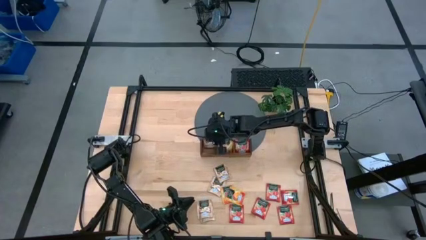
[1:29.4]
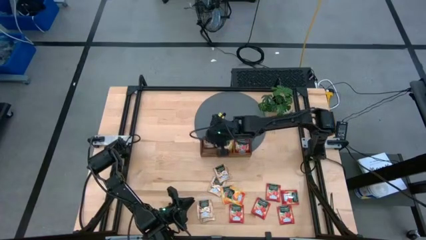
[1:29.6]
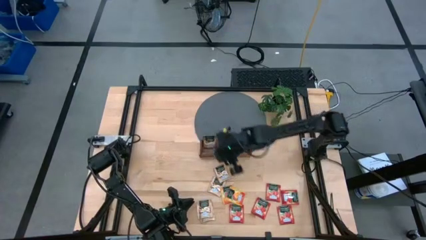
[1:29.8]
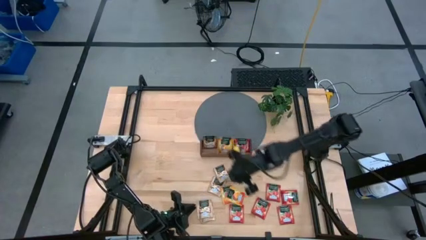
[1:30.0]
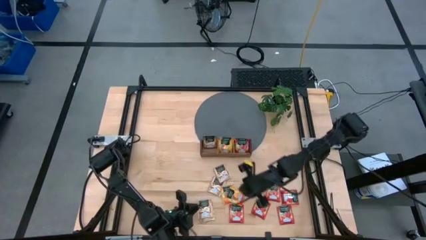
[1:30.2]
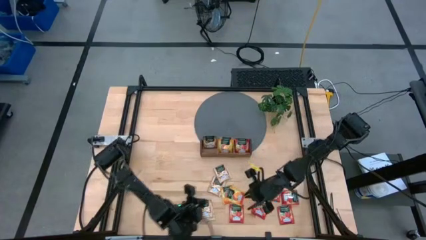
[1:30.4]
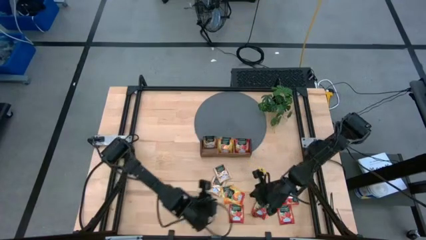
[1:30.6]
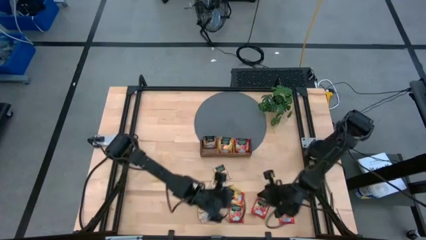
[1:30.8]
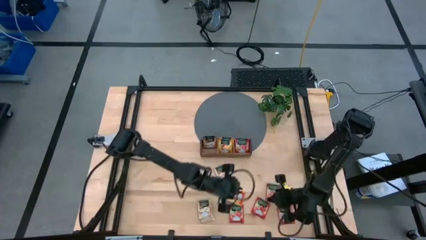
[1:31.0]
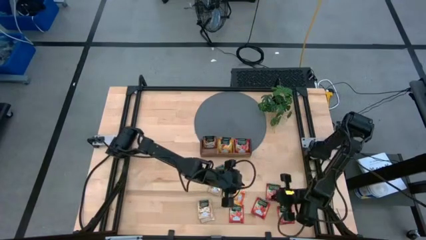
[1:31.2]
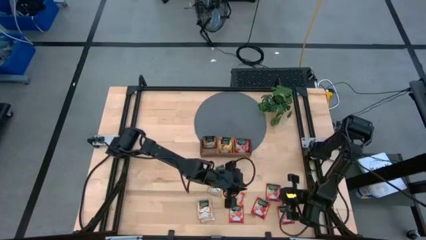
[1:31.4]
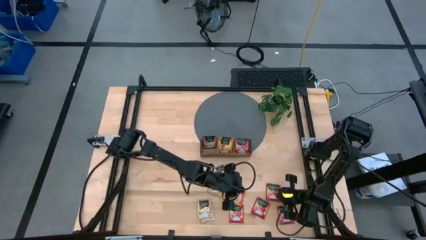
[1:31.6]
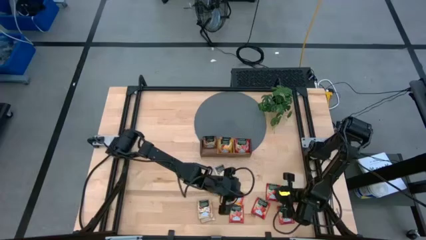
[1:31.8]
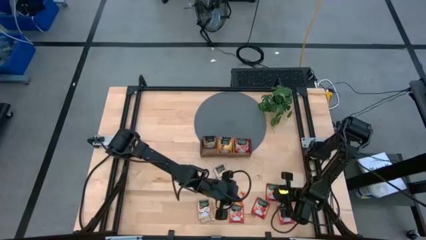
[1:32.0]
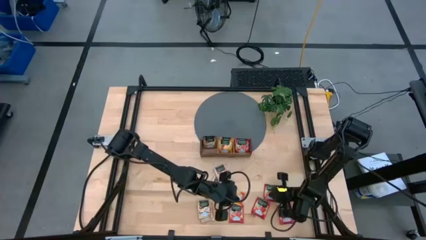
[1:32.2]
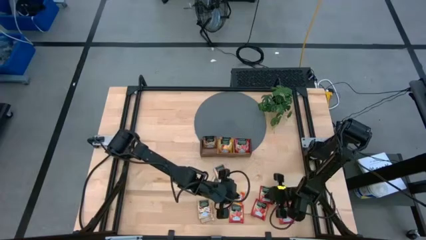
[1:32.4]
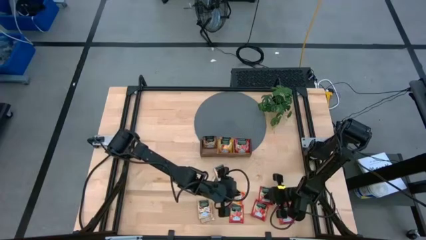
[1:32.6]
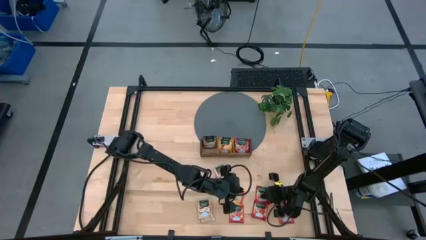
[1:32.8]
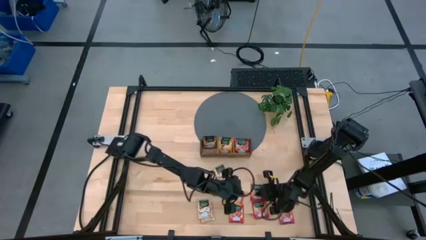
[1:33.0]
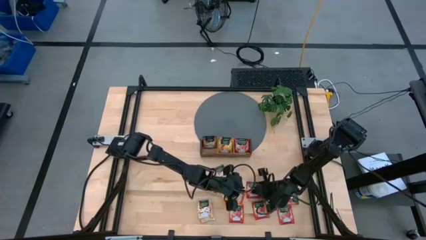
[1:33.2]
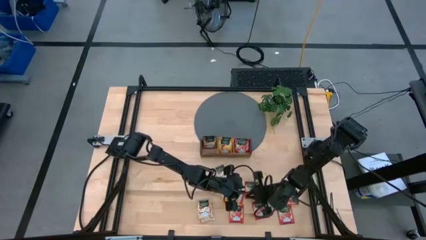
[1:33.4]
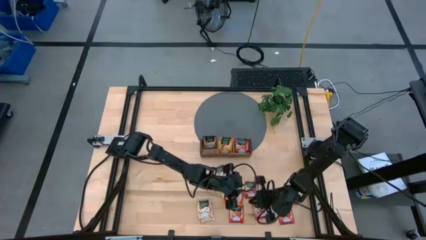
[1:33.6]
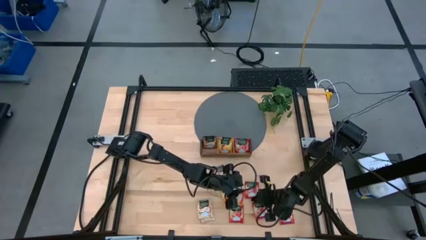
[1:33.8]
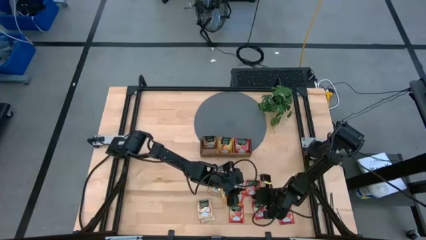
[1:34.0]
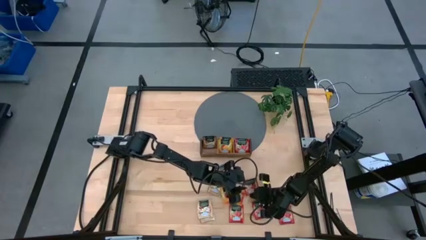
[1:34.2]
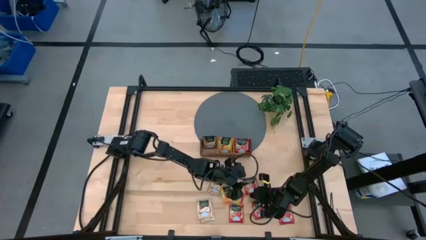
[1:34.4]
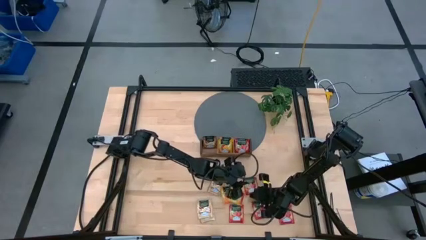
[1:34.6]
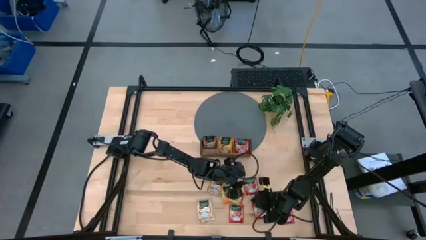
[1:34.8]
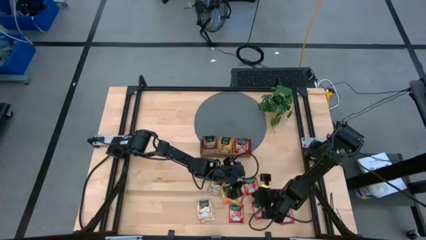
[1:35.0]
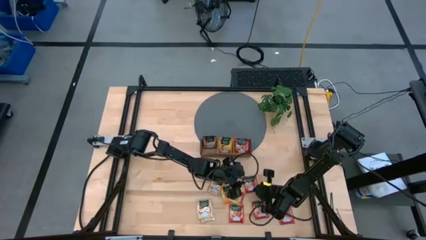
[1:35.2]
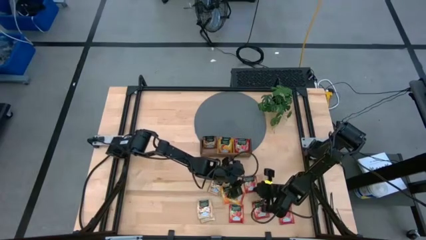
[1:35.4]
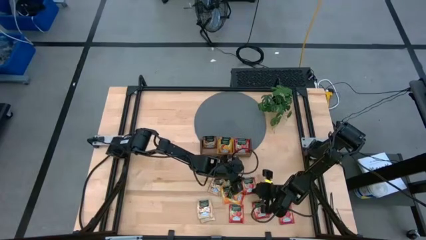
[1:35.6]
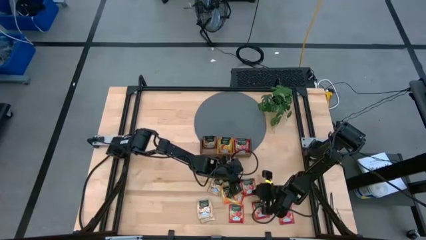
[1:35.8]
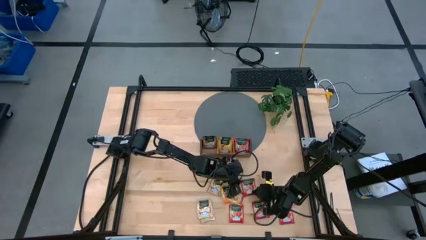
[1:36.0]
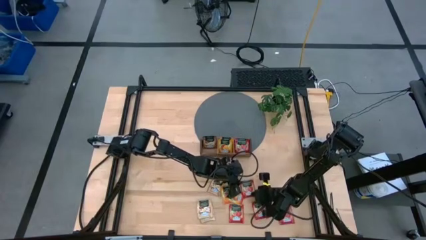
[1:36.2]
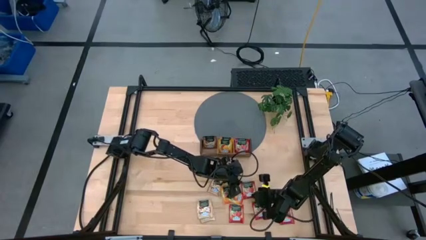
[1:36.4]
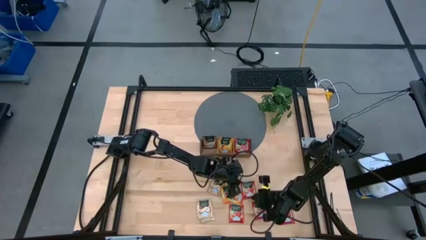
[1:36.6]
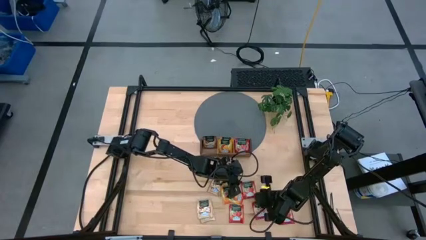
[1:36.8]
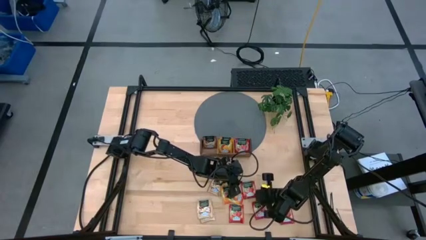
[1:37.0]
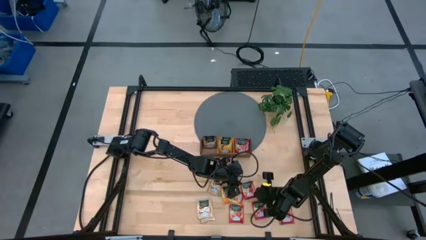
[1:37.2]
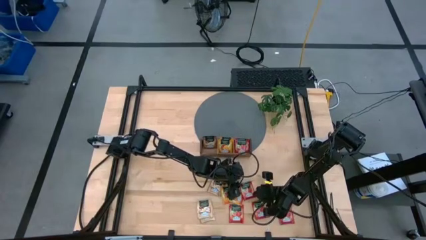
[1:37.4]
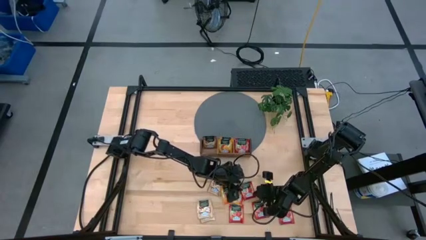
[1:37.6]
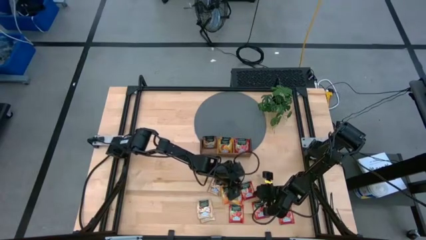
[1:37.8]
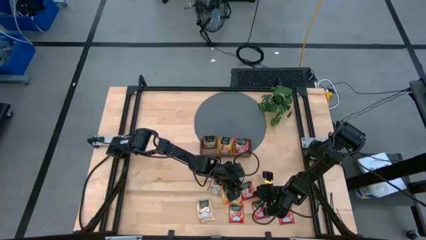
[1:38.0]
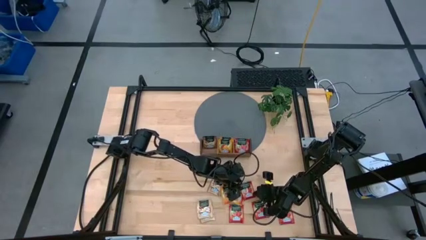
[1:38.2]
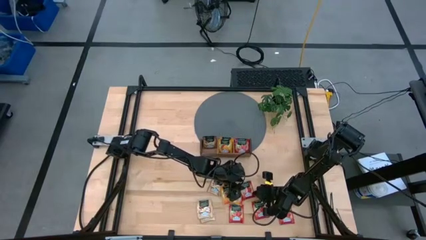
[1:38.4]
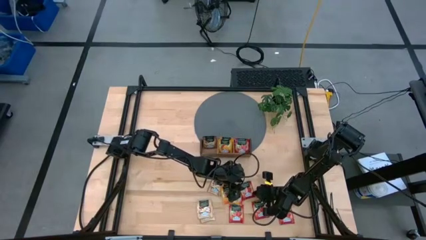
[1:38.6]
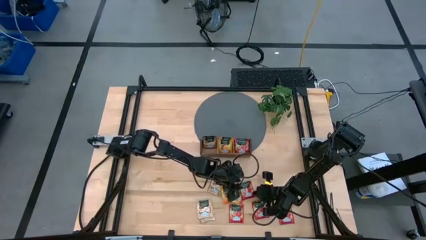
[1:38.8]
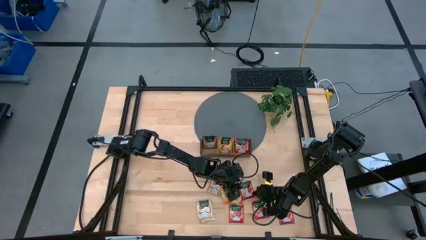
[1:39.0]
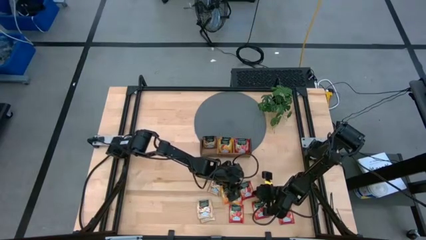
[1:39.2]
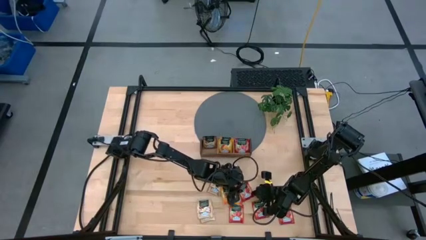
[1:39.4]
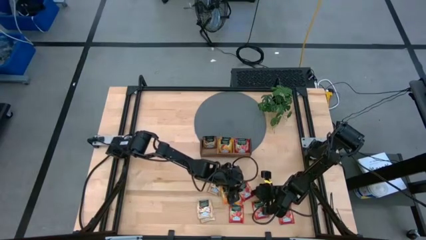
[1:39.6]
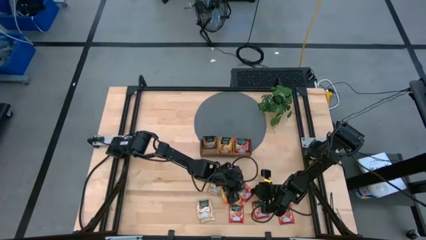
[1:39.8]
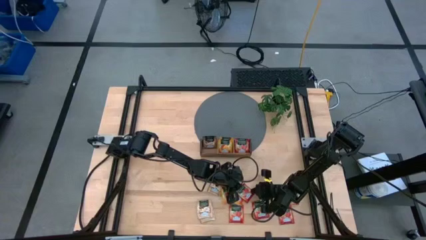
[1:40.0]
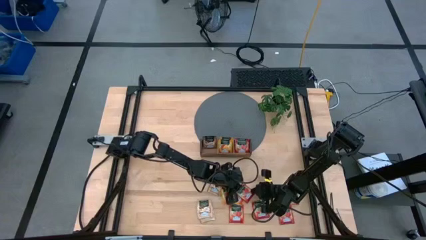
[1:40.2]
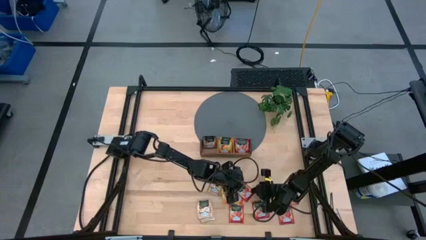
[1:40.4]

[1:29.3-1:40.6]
Task: Pick & Place Tea
Put the red tea bag into the right wooden organizer
